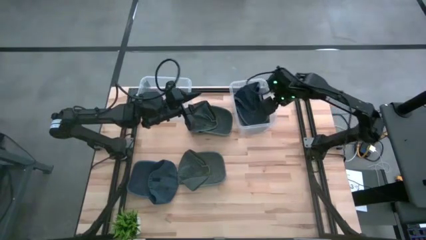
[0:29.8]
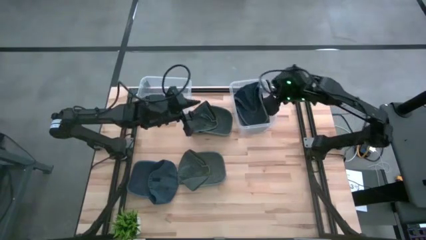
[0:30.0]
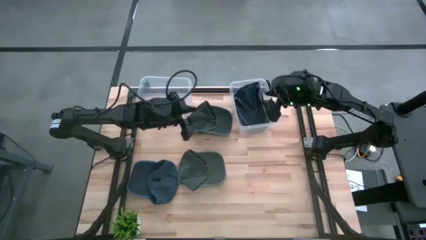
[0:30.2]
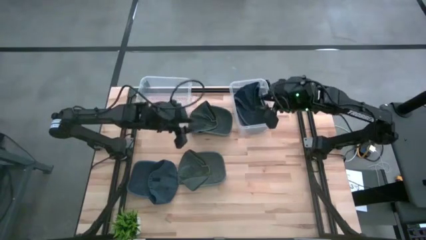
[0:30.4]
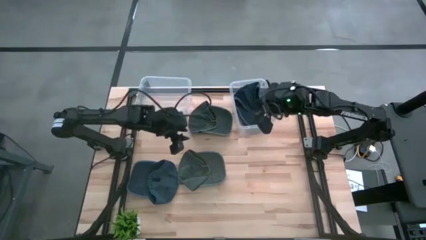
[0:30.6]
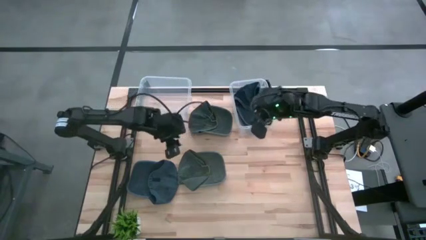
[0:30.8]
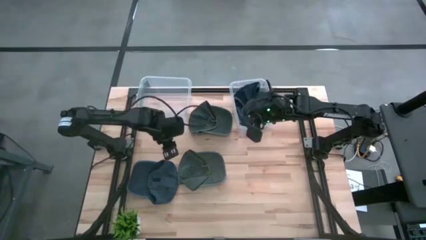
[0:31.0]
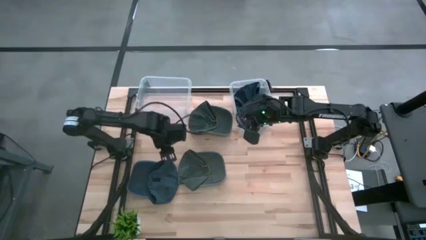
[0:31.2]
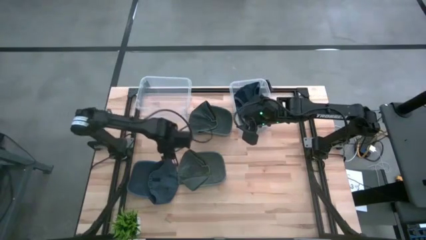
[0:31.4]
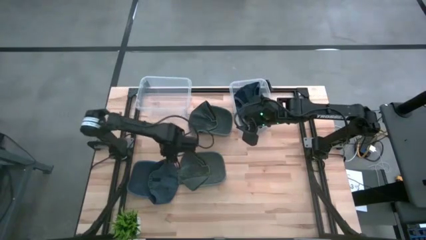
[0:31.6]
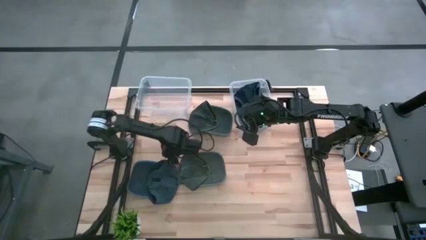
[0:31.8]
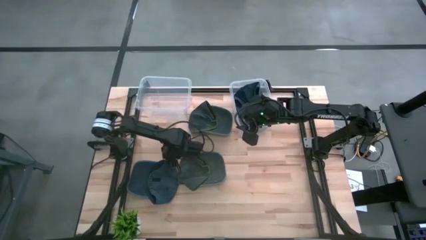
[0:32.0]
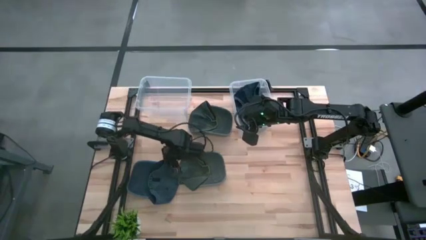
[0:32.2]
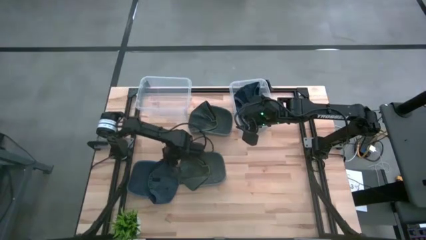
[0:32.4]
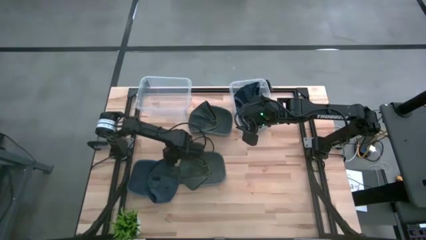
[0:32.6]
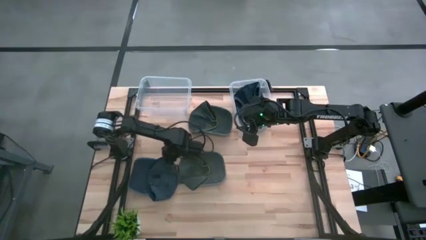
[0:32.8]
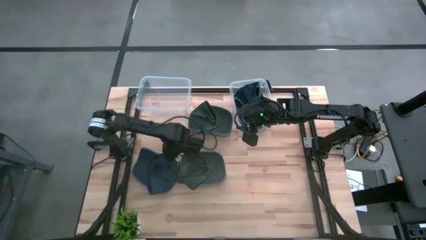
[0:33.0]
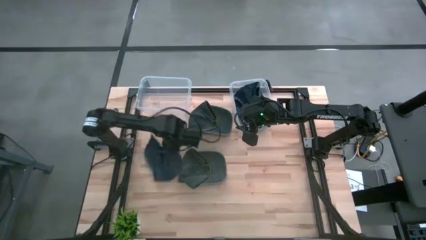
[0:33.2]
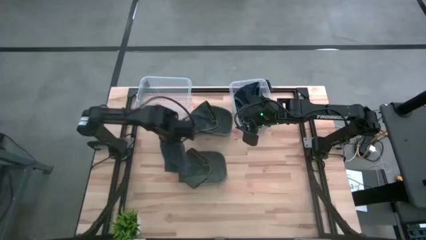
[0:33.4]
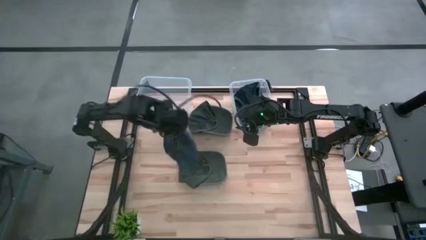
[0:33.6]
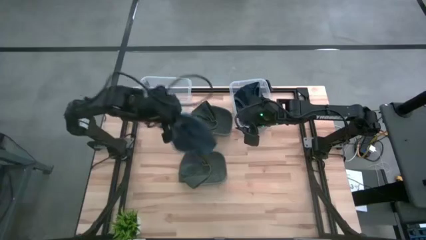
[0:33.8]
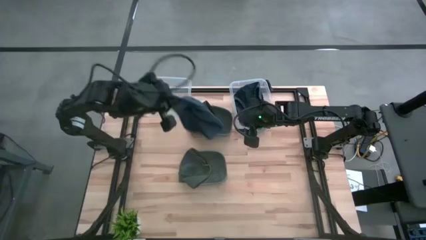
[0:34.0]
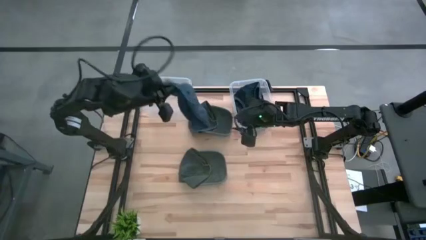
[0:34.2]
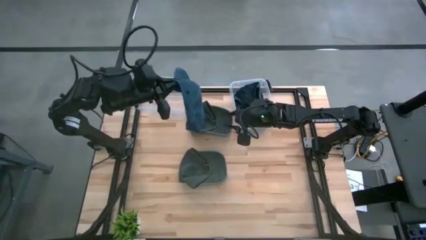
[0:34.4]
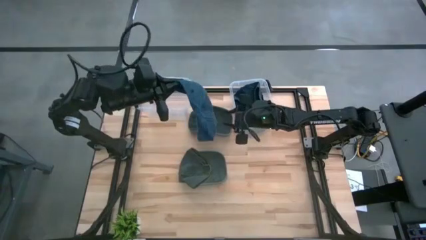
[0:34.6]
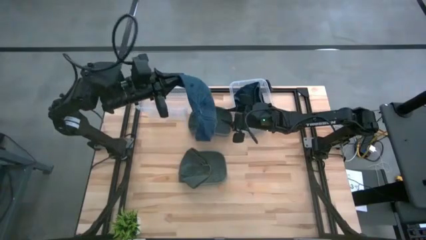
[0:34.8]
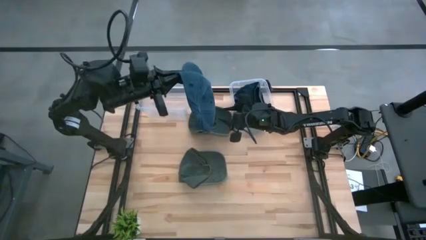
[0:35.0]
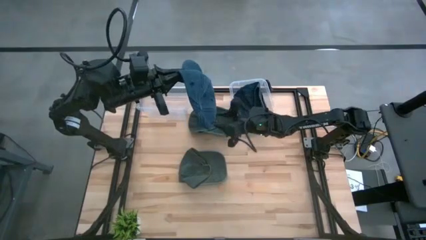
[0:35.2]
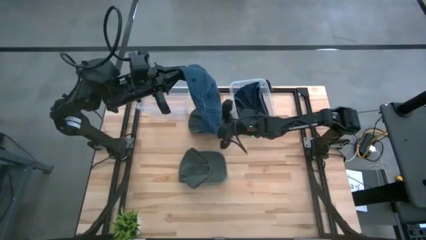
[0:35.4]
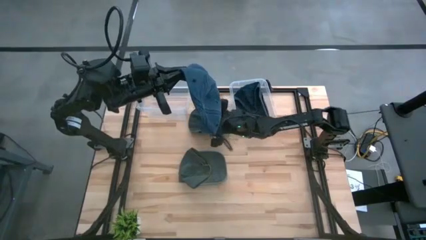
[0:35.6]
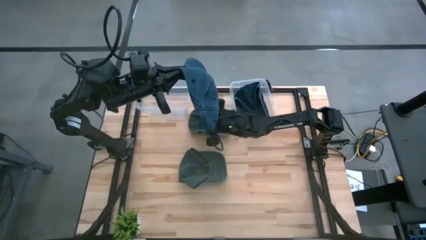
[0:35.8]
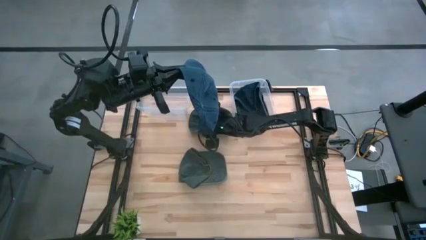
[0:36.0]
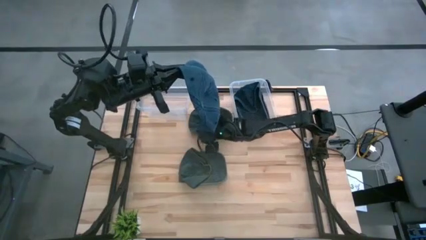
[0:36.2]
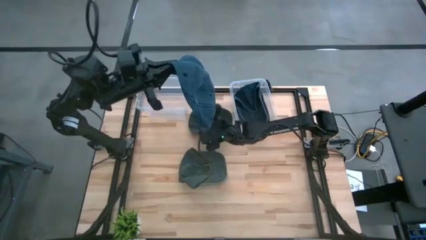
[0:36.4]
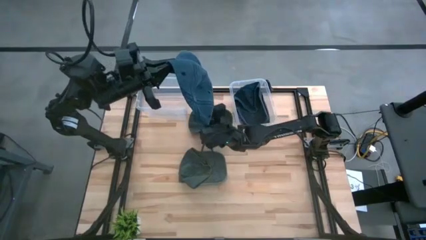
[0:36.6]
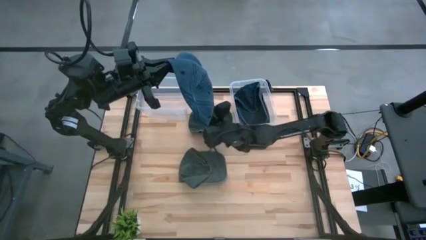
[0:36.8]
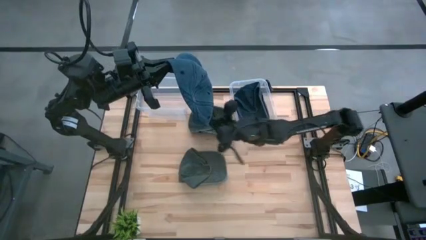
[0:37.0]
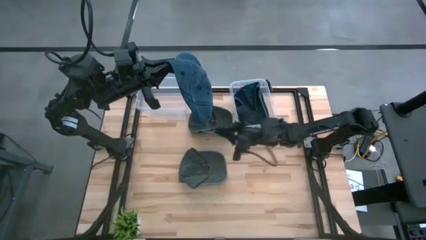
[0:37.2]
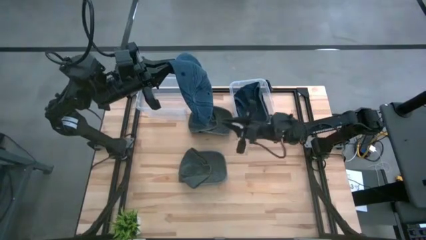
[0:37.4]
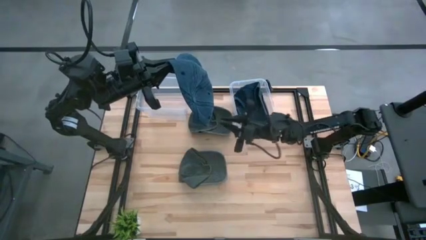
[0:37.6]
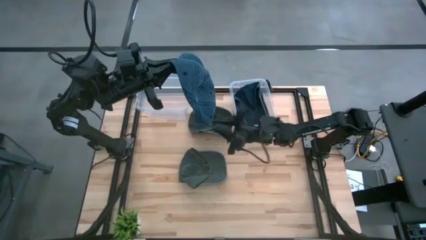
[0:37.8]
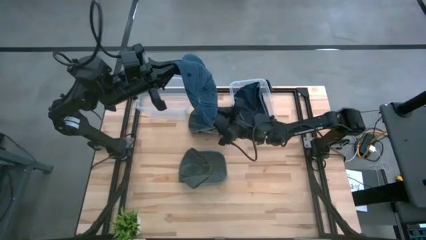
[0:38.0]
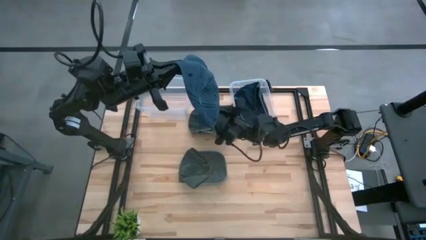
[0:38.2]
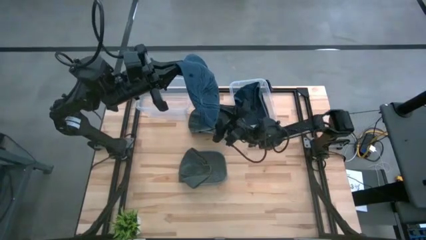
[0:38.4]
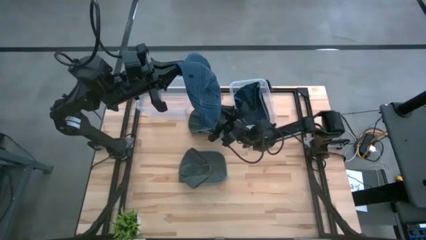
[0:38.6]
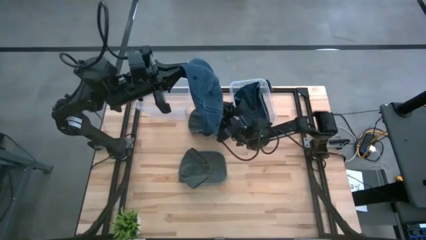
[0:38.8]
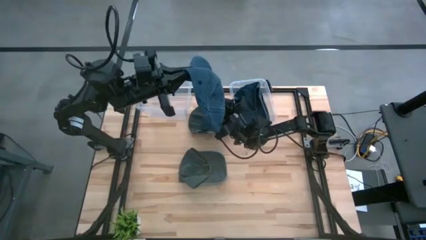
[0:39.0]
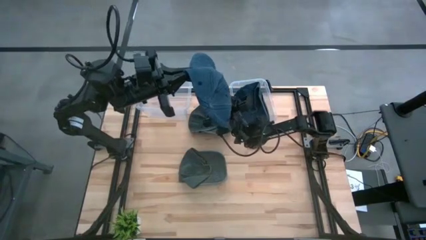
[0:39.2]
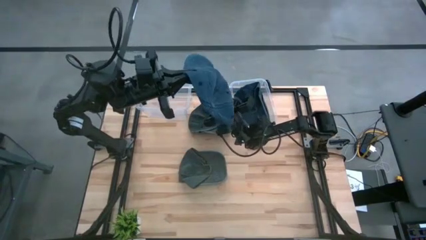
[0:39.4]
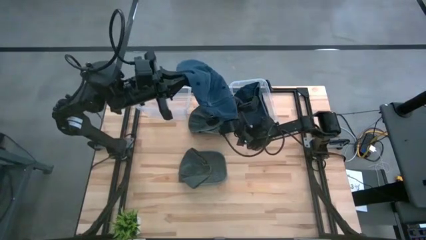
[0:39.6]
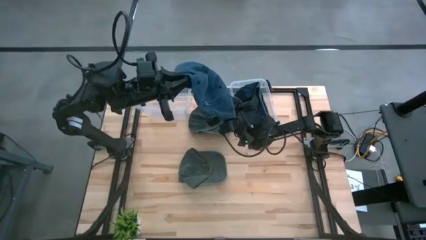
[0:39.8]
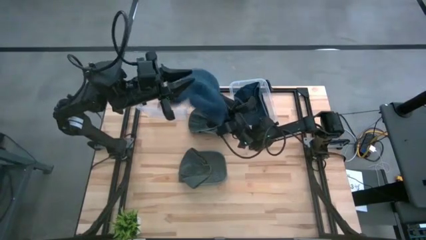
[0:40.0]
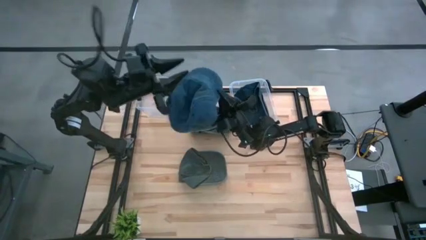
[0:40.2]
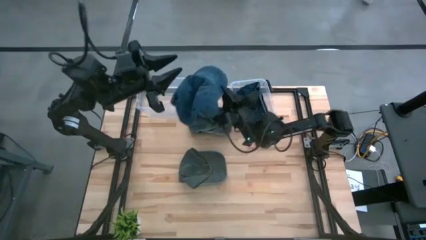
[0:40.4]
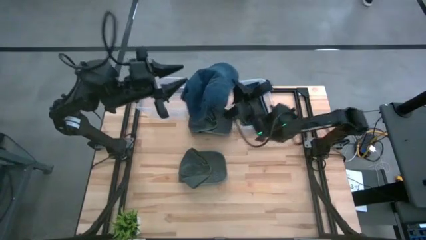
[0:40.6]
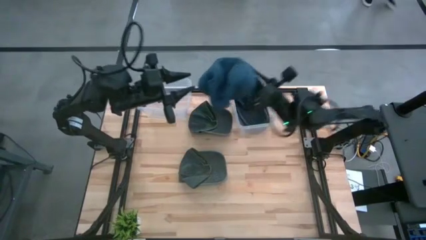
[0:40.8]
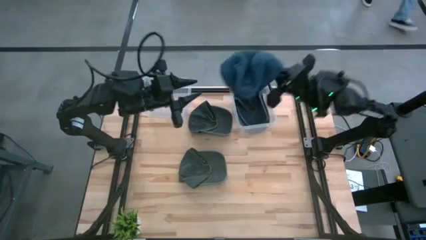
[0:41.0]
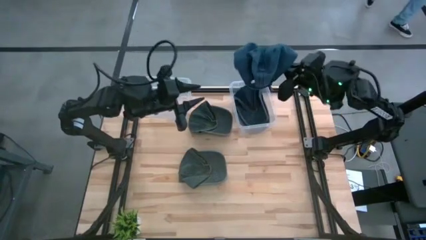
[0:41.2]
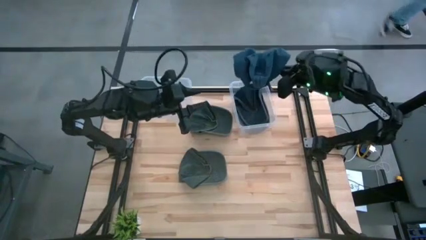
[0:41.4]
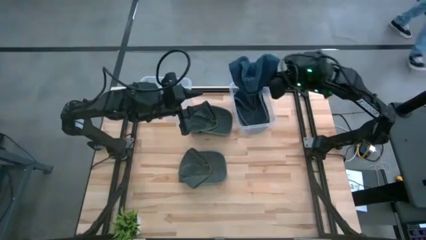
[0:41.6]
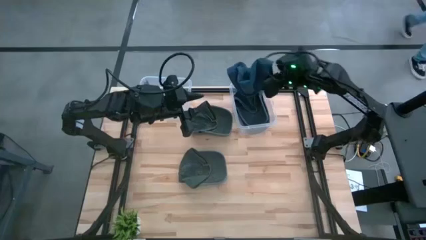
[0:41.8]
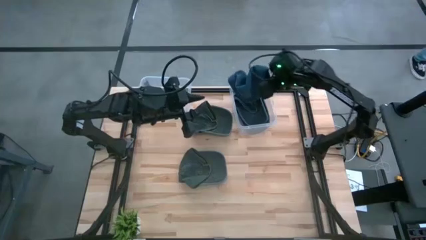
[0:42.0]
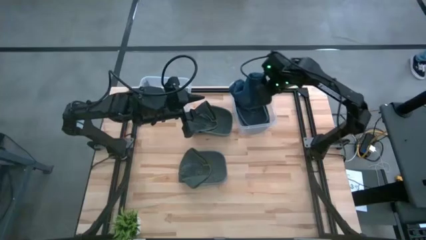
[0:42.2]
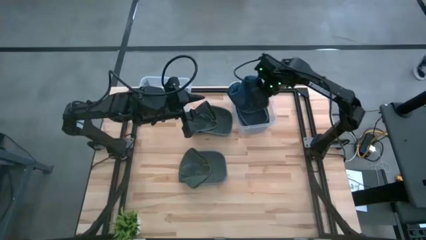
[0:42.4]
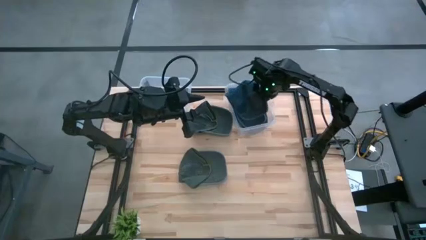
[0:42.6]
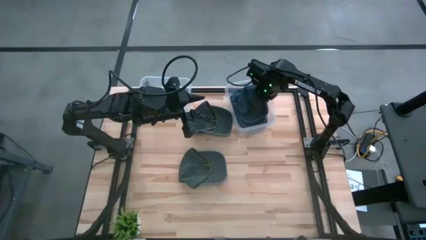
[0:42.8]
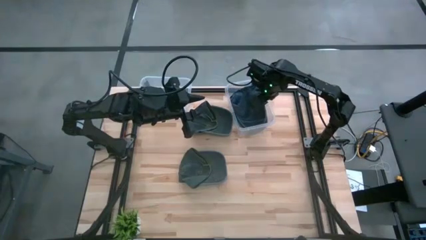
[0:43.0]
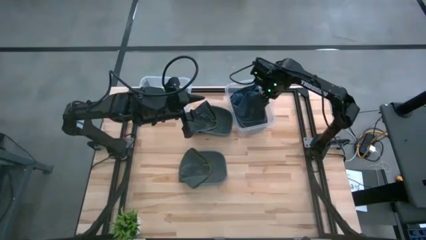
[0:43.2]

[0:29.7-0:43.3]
Task: Pick & Place hat
Put the blue cap into the right transparent bin
